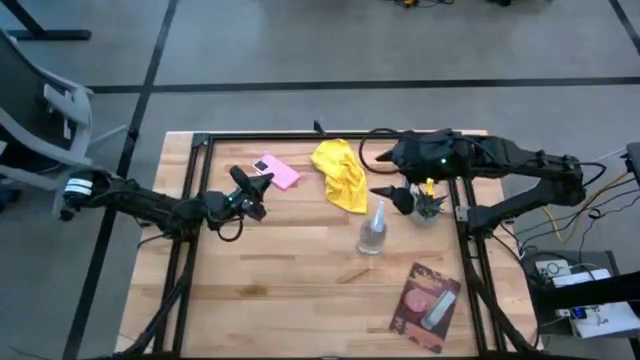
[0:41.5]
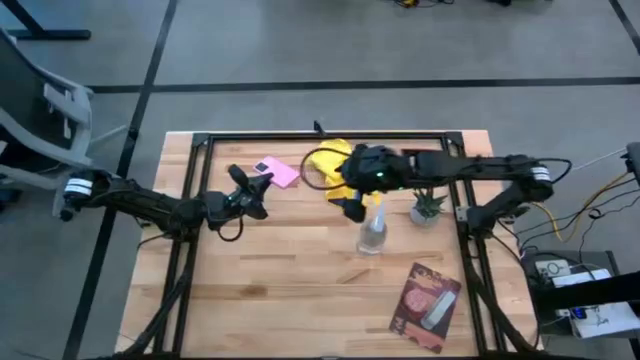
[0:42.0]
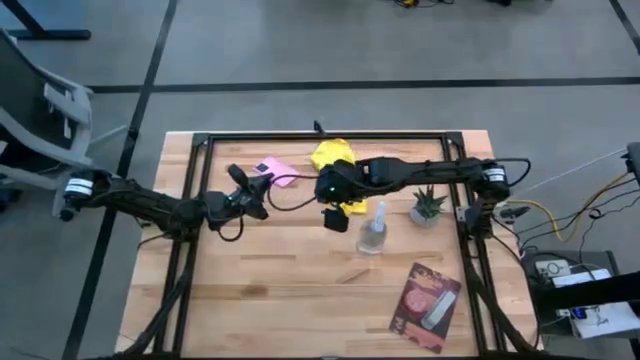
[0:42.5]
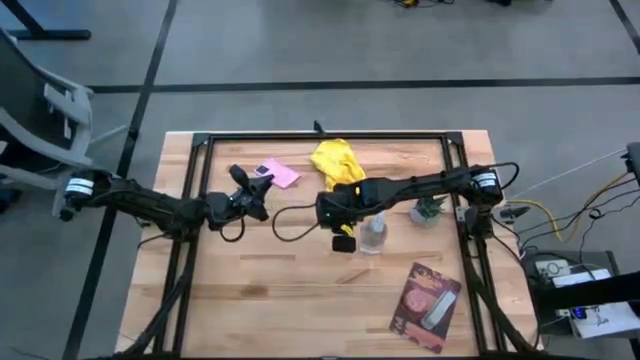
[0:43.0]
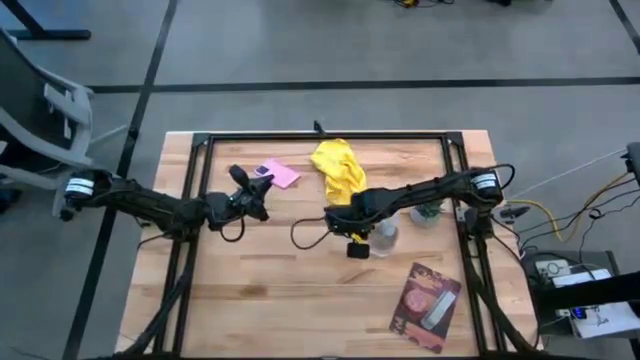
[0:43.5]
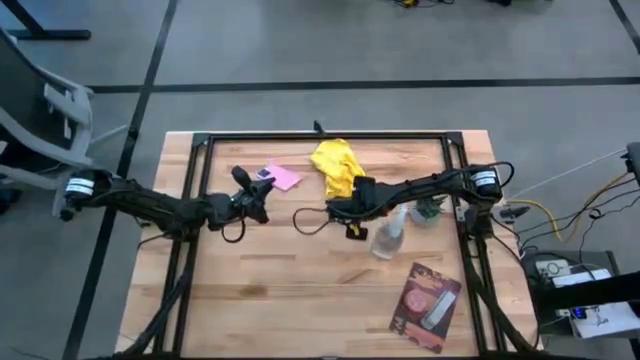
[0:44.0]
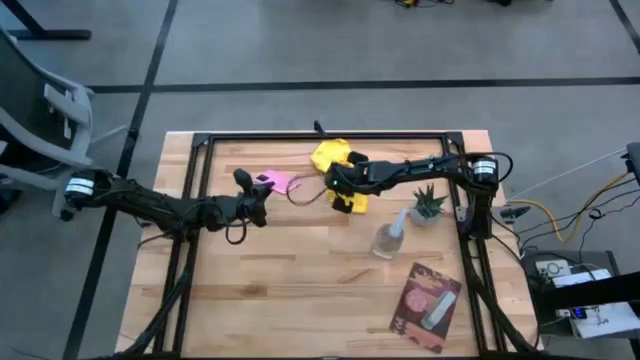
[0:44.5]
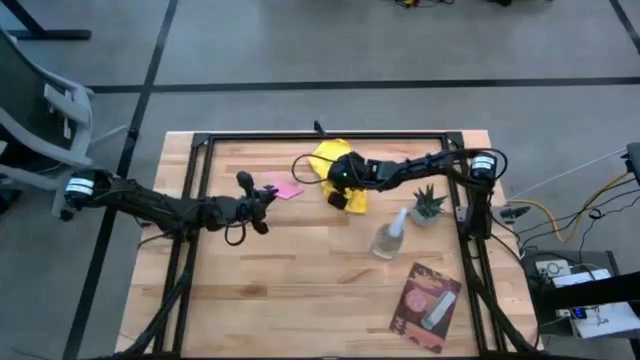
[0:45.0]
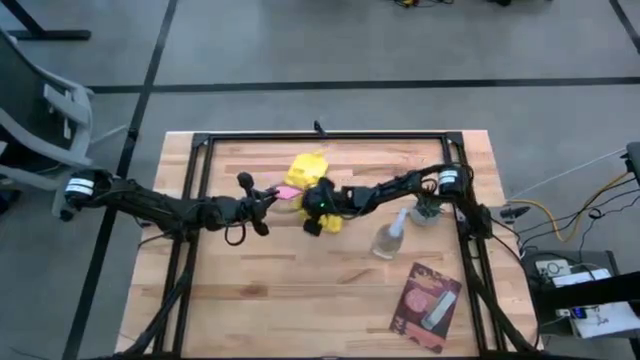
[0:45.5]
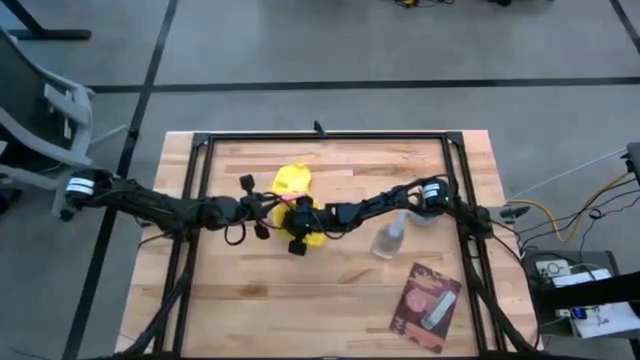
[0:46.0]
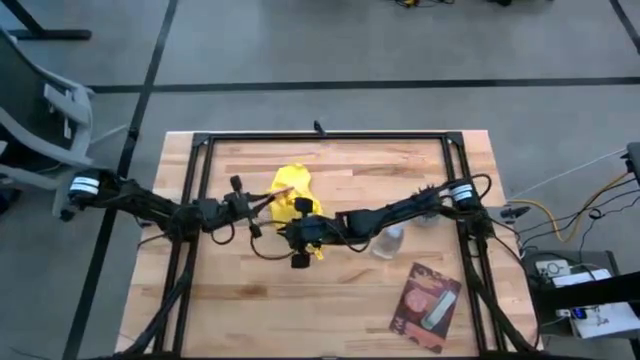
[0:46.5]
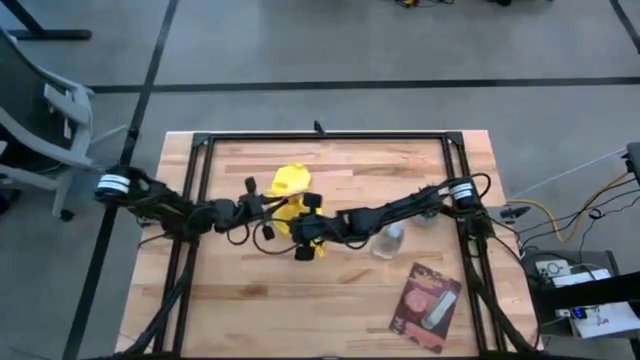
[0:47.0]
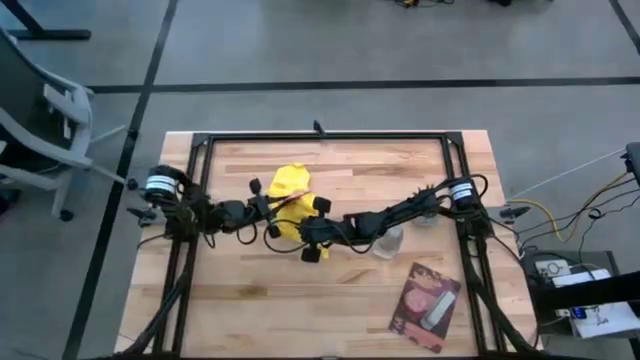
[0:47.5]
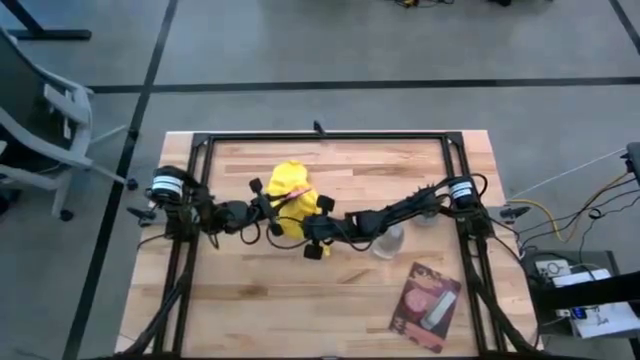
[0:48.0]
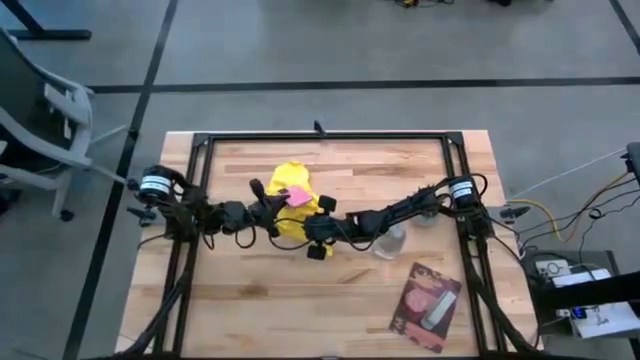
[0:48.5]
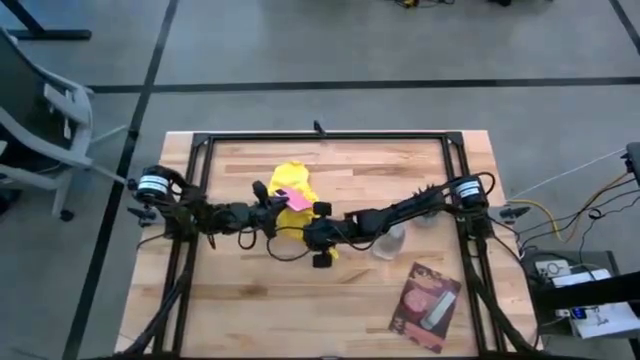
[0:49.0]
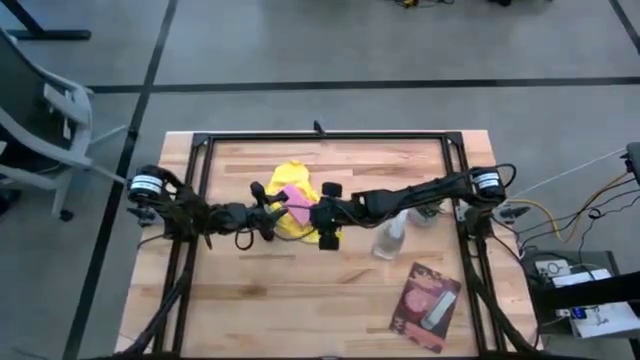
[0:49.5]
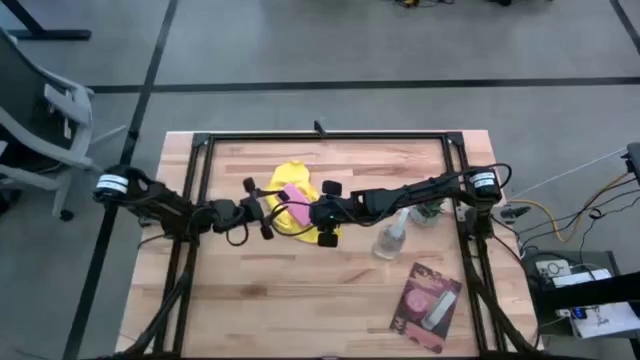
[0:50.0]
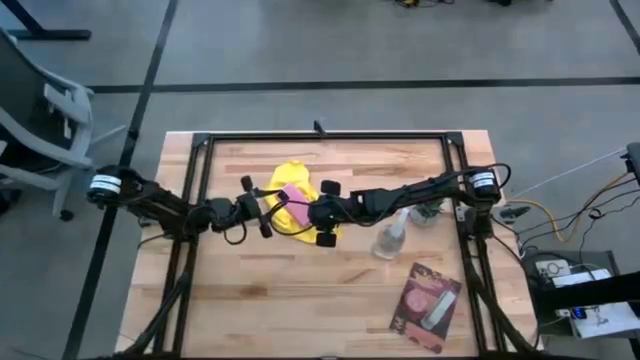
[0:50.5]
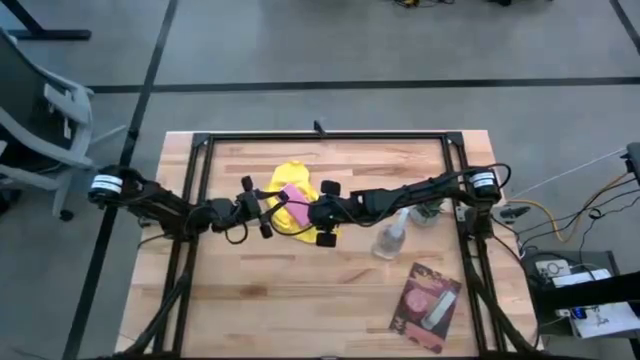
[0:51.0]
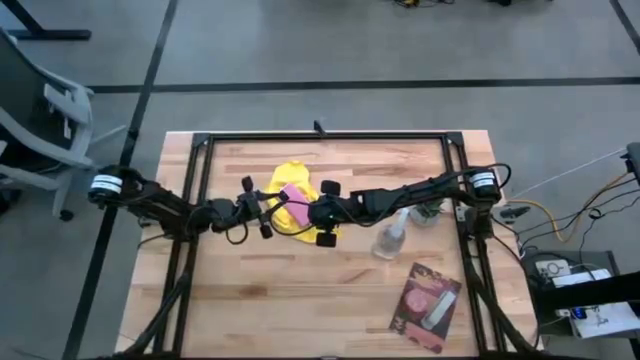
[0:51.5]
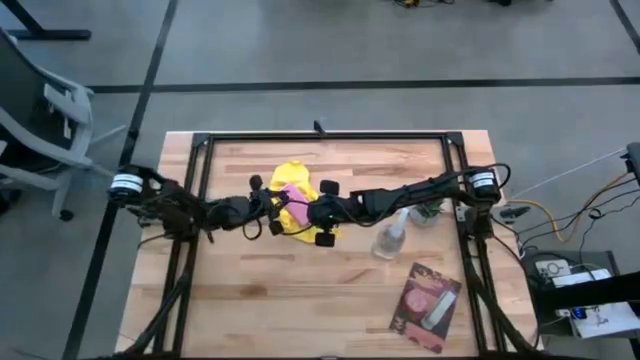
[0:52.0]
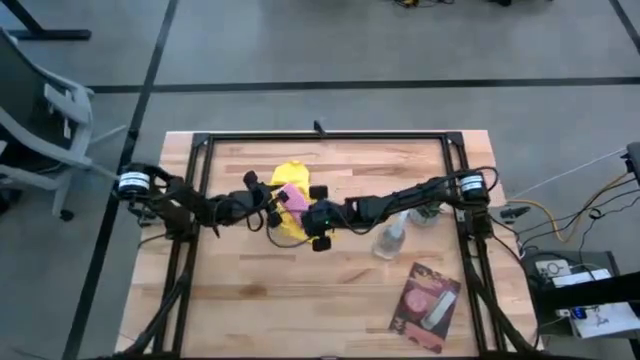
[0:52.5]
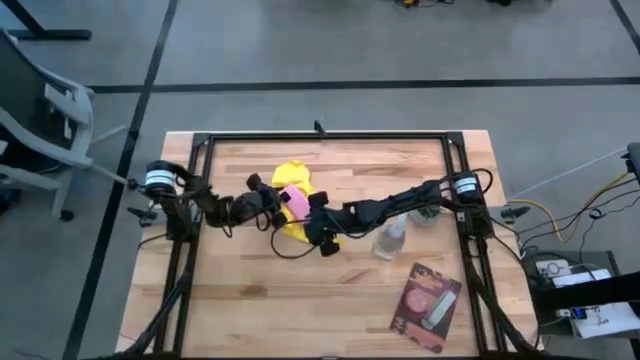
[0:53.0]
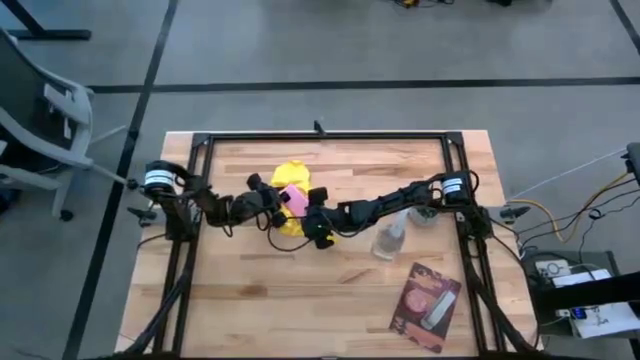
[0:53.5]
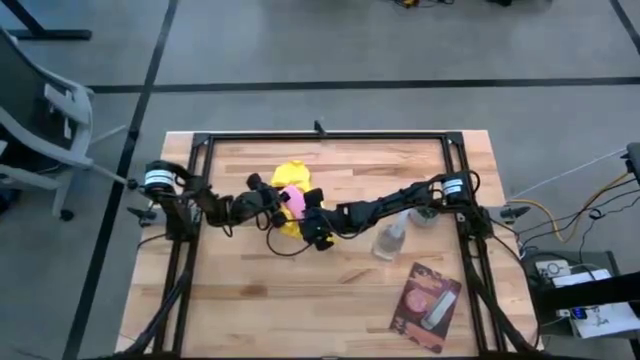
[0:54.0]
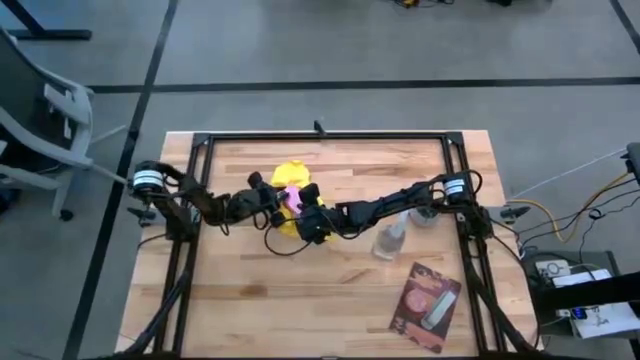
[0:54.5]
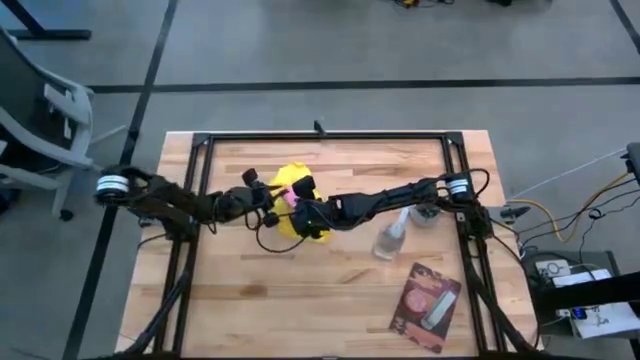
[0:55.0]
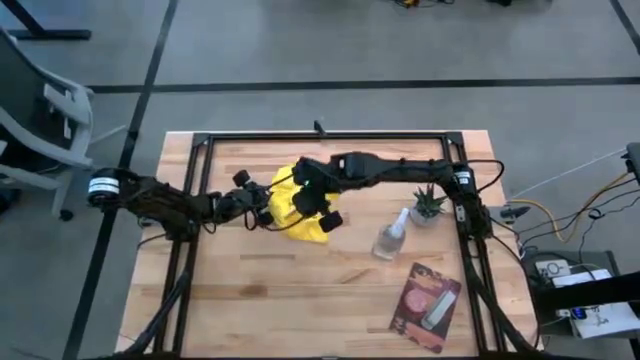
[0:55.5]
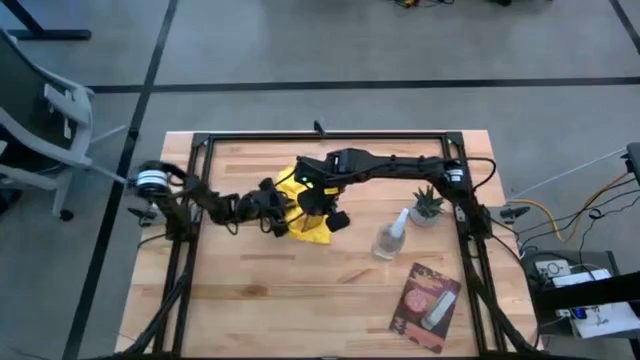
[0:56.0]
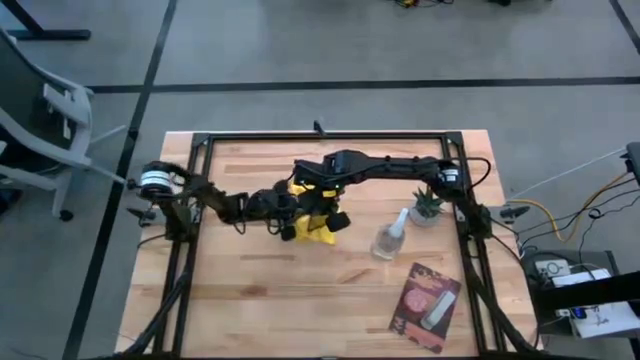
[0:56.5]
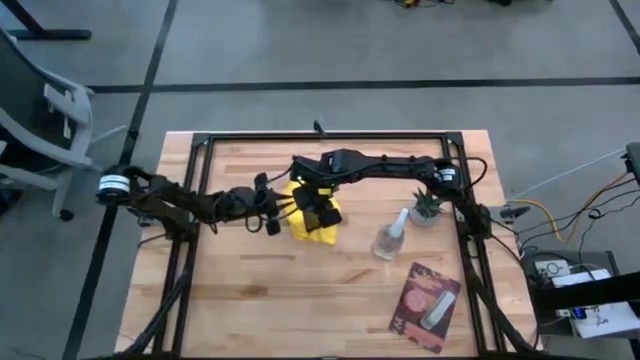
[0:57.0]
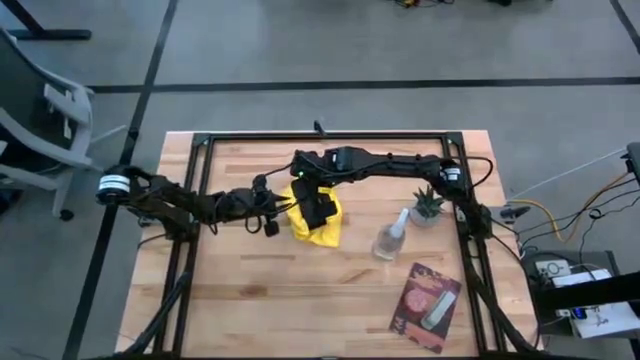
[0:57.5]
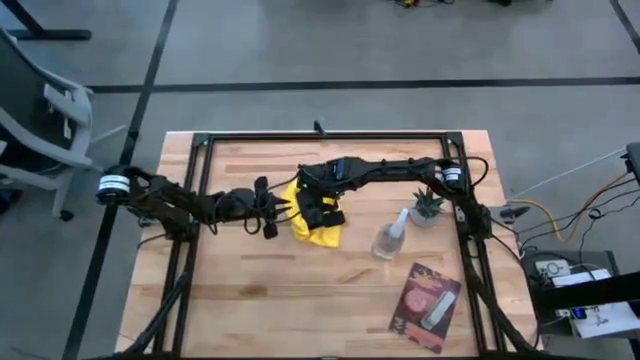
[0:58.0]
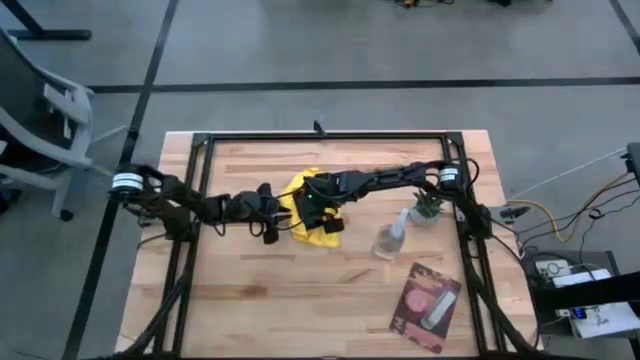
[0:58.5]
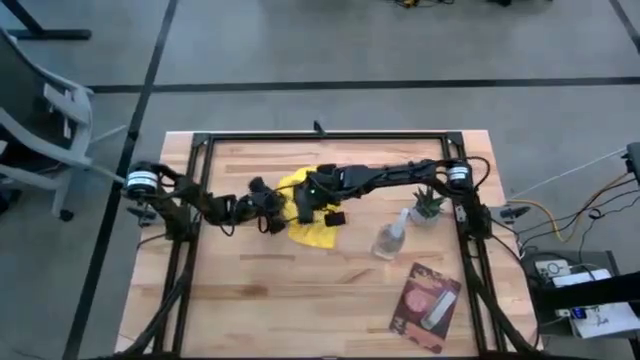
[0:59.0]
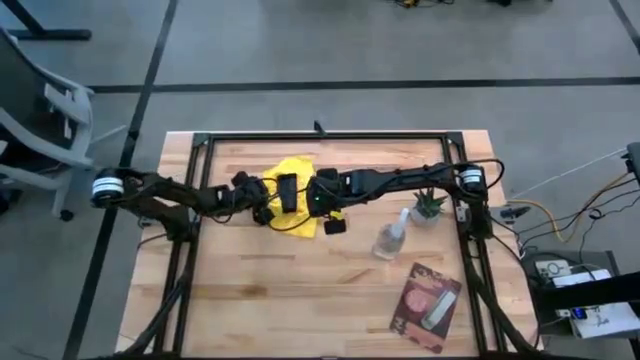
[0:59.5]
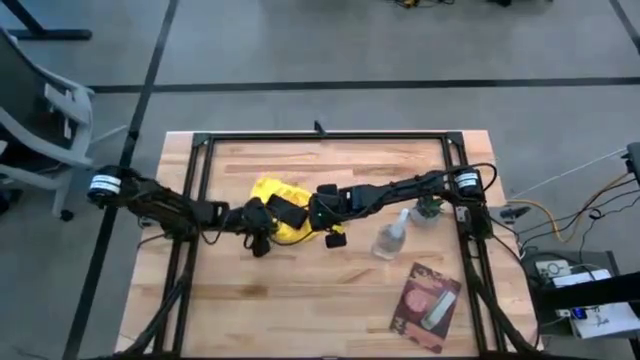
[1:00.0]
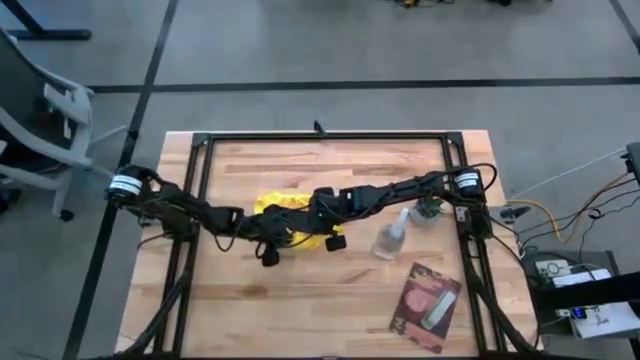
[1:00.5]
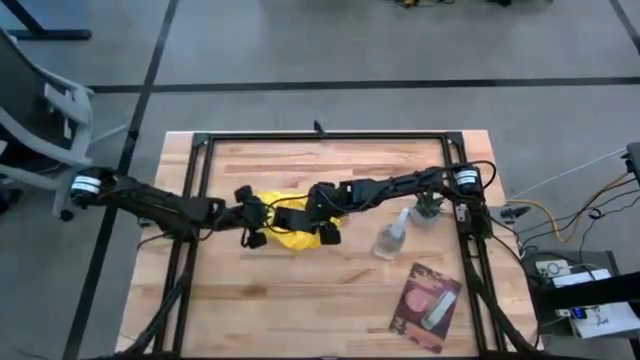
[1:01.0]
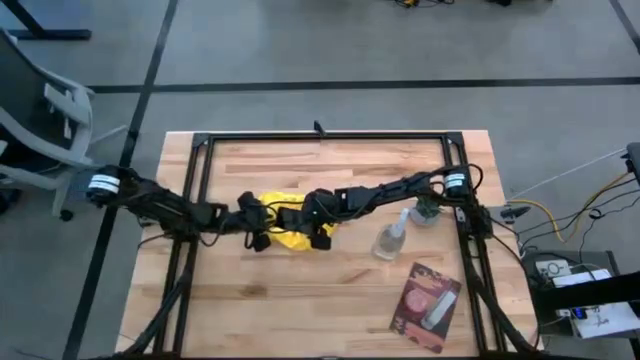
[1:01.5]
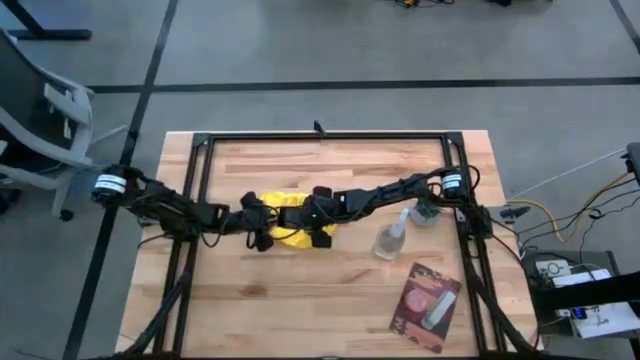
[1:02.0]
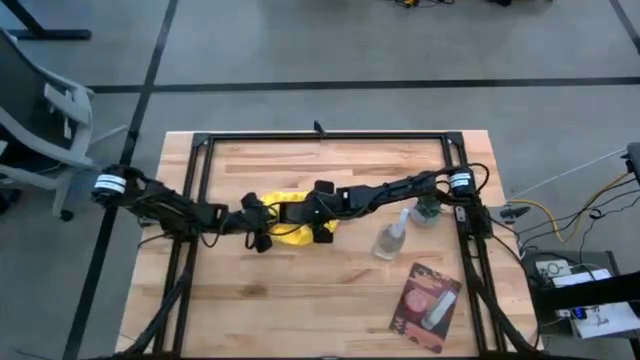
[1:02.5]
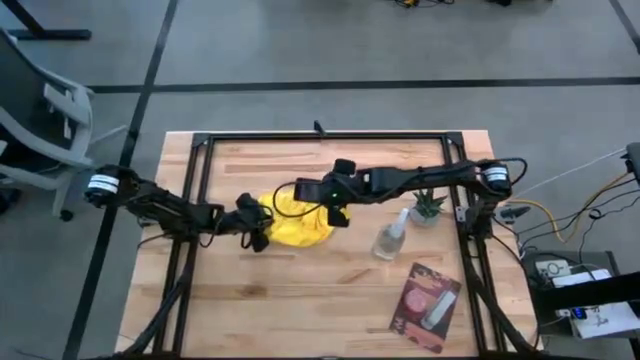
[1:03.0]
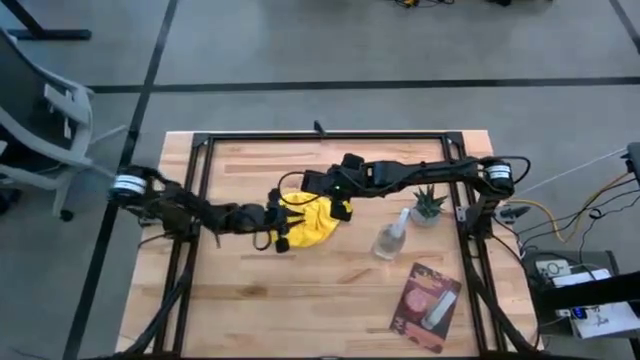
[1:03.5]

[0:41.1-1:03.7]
Task: Apply microfiber cloth
Wipe the front of the pink cellphone with a microfiber cloth
